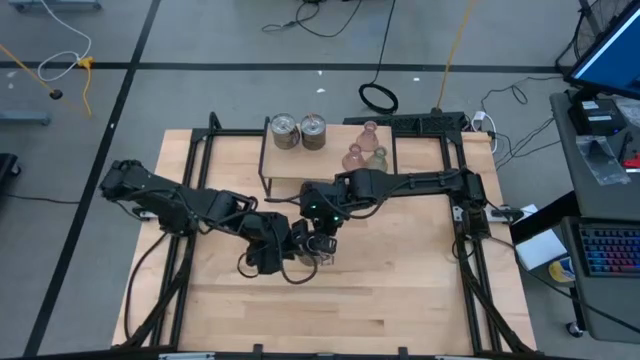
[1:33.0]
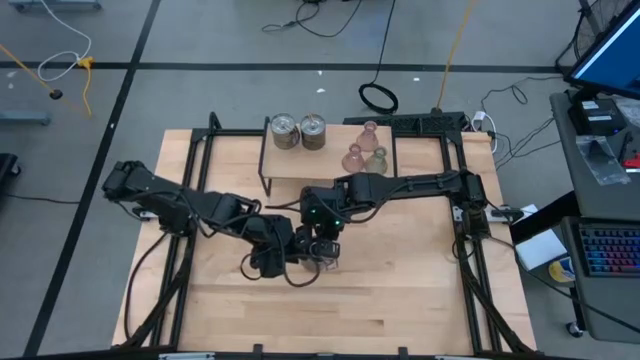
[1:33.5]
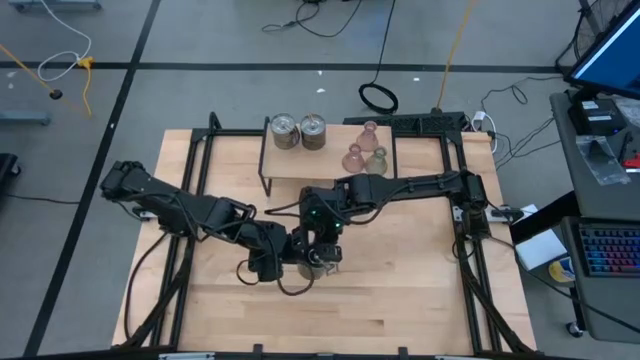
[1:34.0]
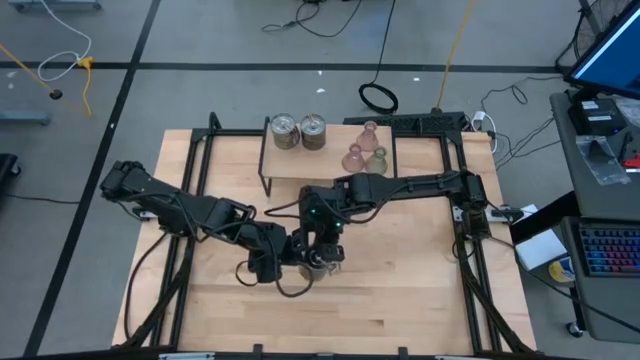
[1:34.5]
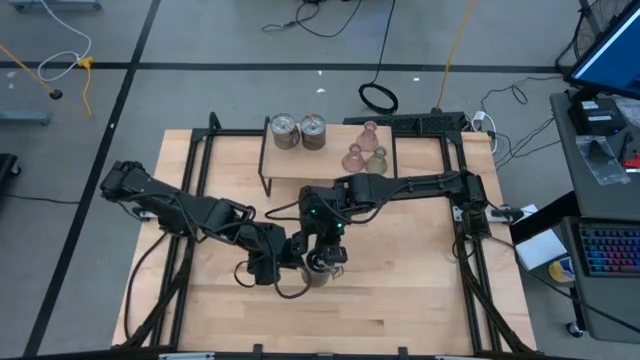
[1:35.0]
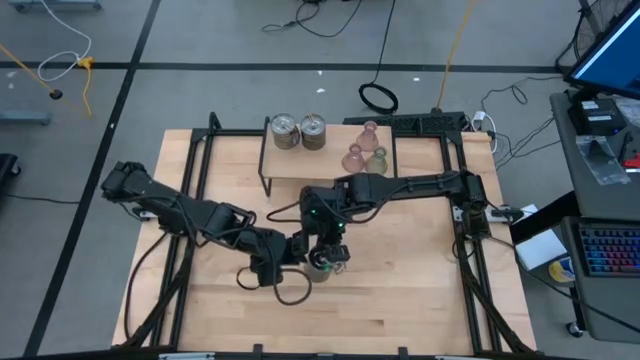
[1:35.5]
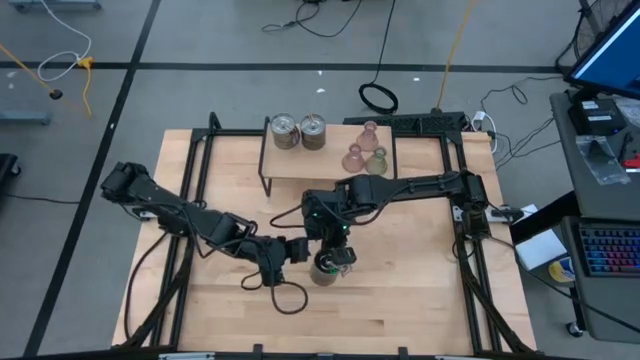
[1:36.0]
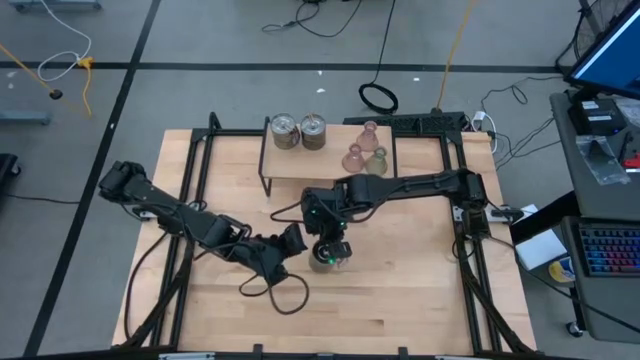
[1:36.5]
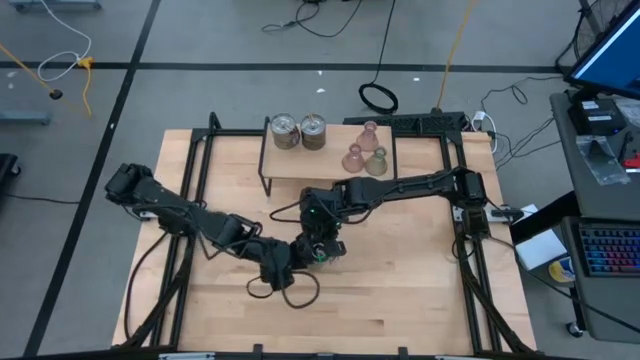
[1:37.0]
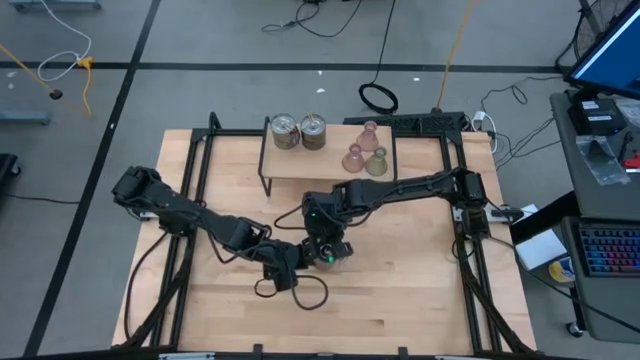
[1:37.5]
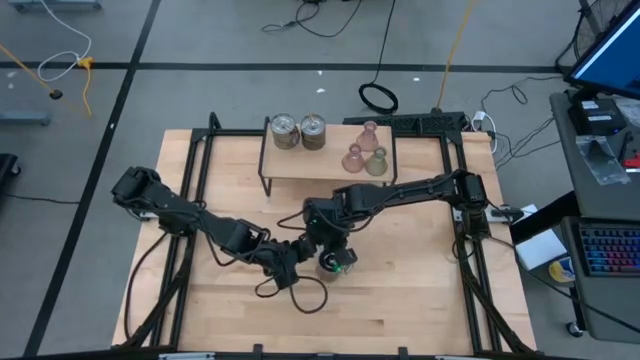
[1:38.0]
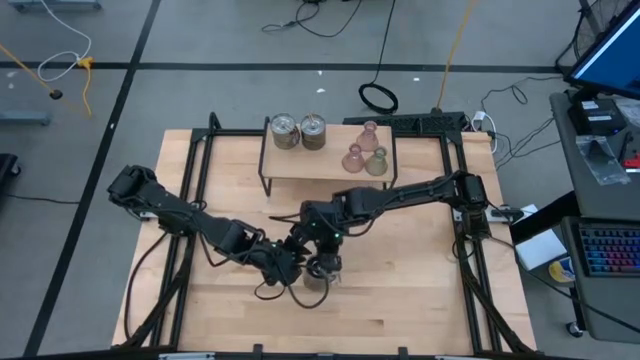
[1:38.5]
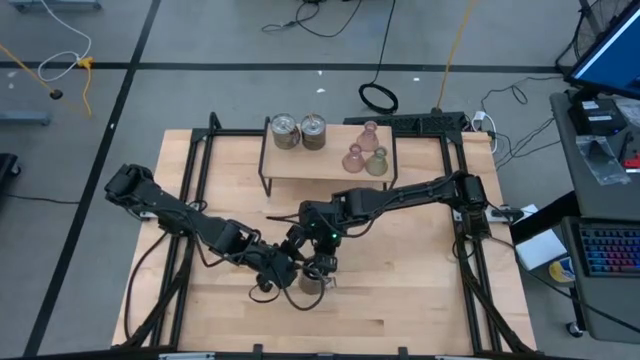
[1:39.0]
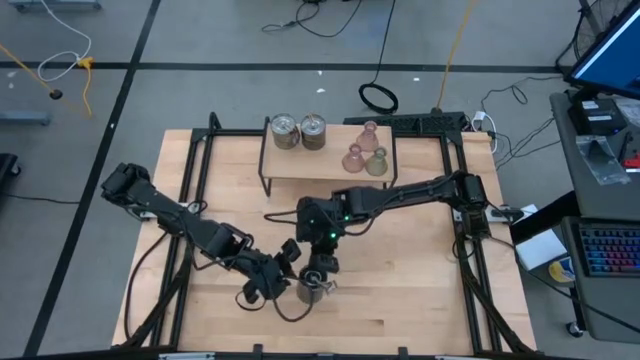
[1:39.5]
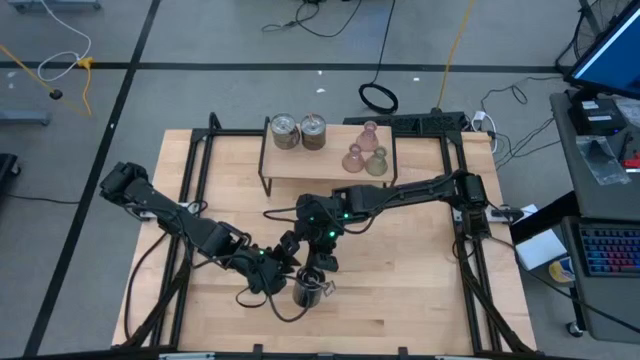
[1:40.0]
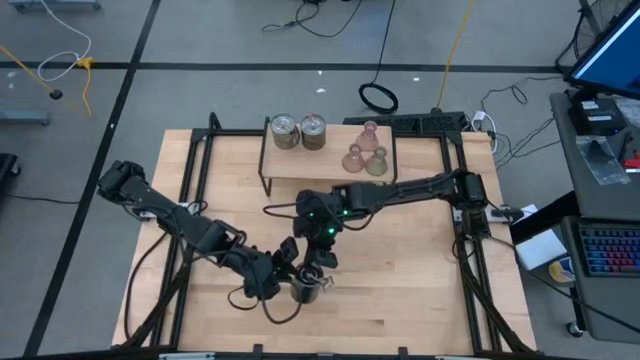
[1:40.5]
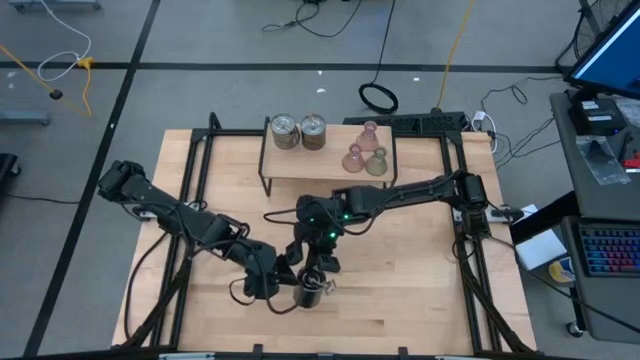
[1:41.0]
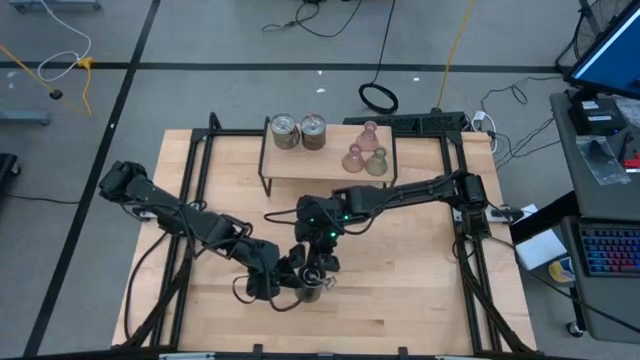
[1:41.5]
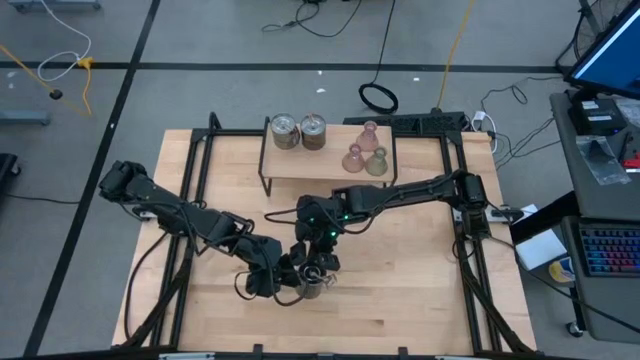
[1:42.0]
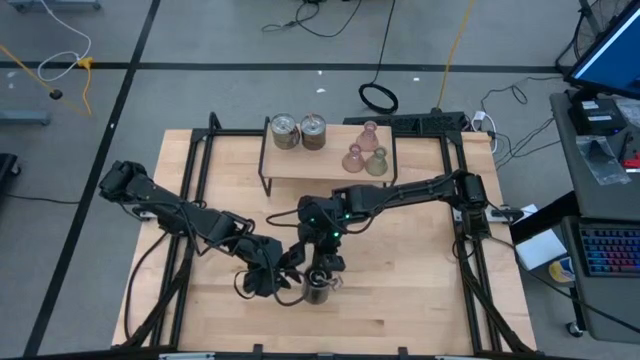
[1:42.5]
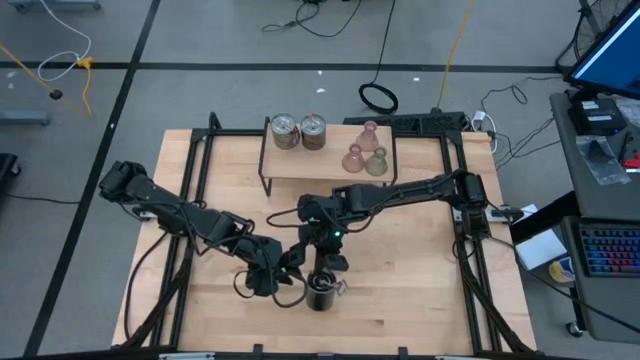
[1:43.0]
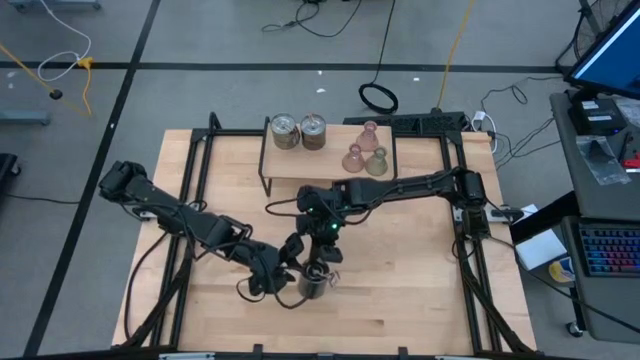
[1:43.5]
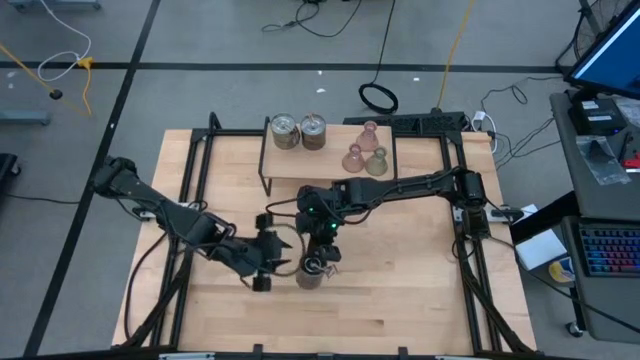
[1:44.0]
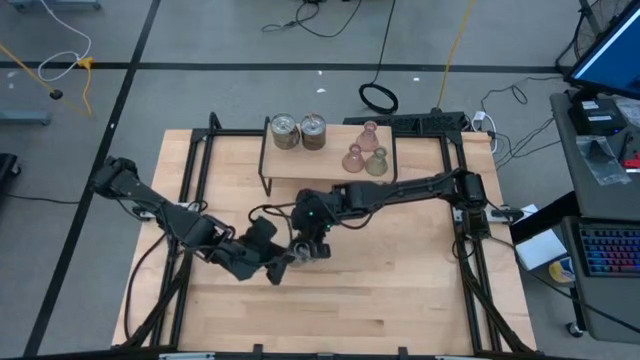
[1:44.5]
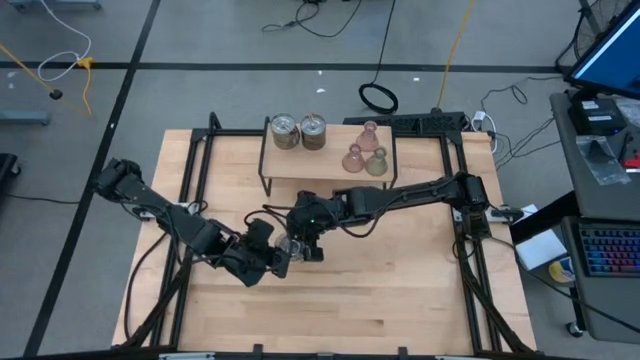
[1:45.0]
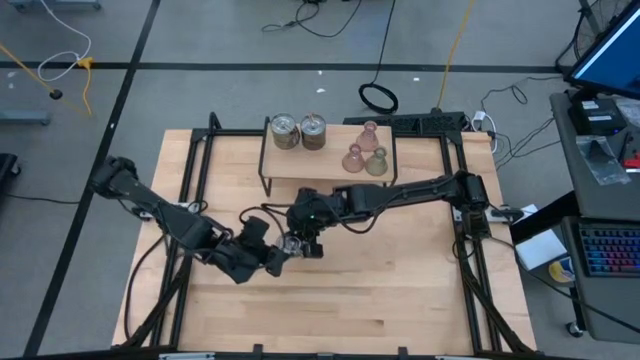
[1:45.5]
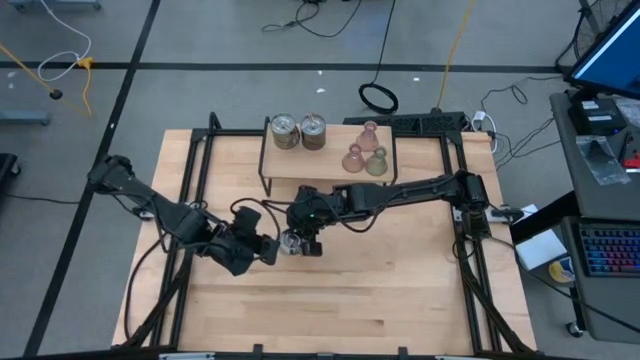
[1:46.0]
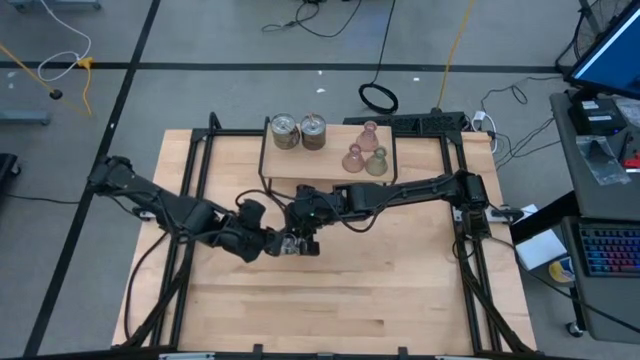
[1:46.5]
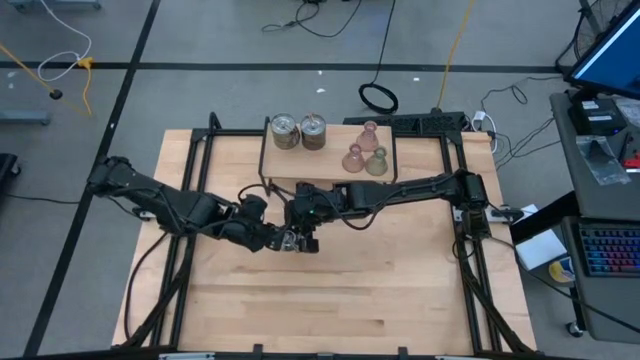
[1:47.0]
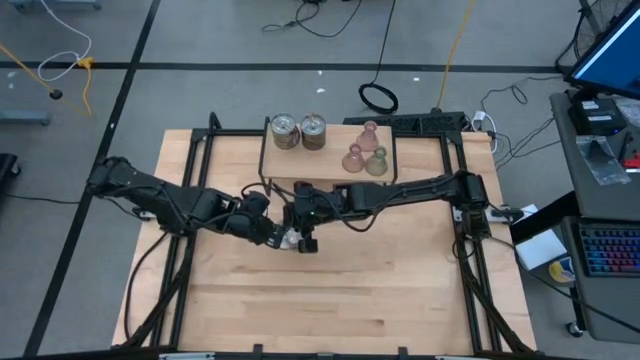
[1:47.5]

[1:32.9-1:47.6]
Task: Pick & Place candle stick holders
Put the scented candle on the shelf

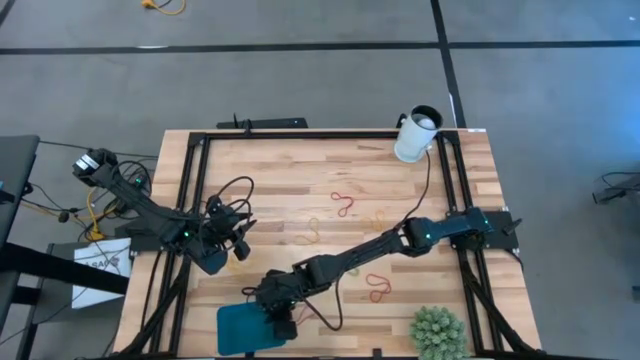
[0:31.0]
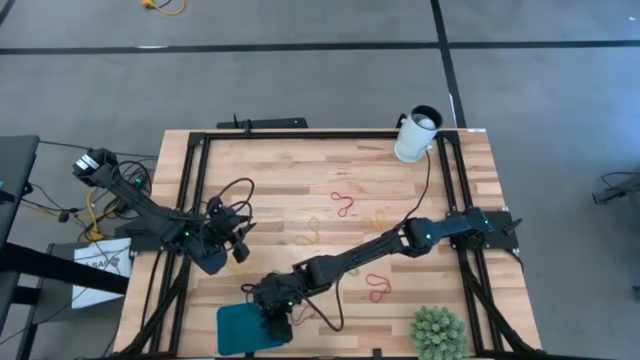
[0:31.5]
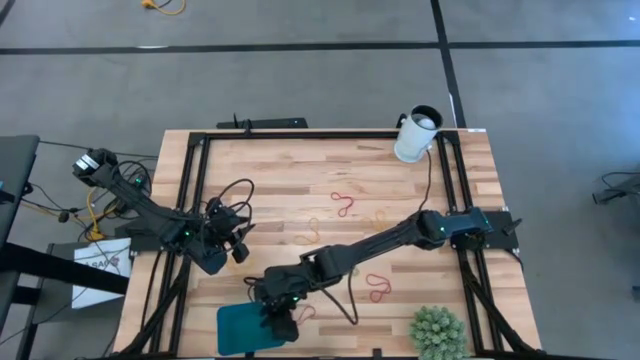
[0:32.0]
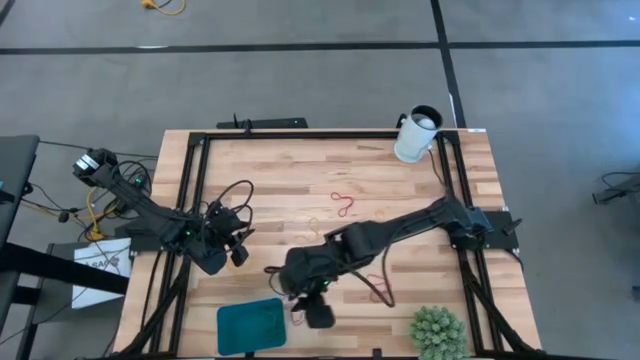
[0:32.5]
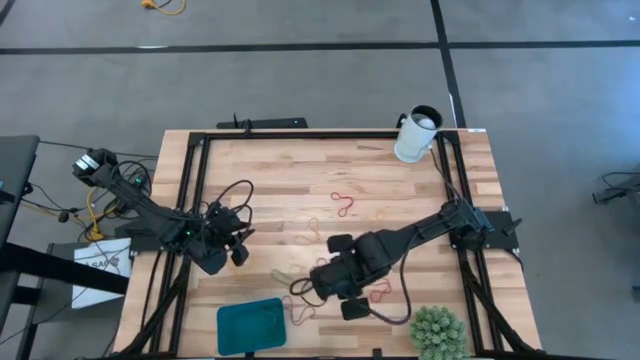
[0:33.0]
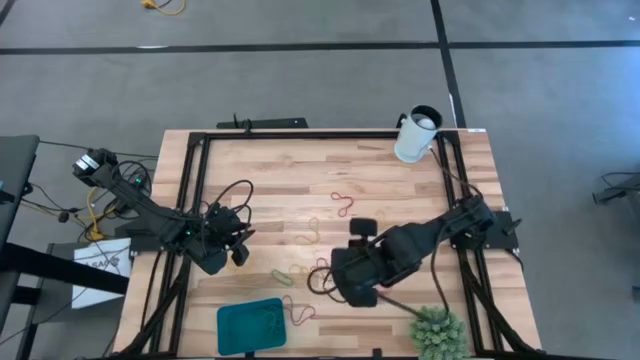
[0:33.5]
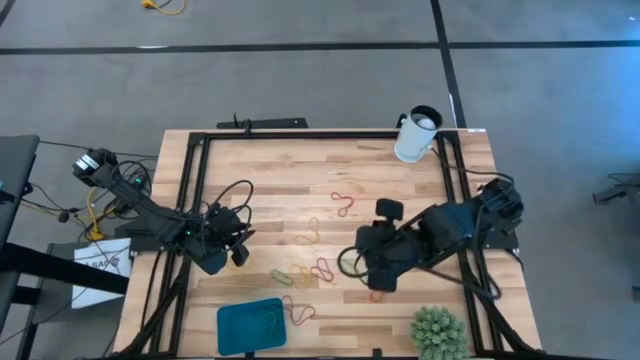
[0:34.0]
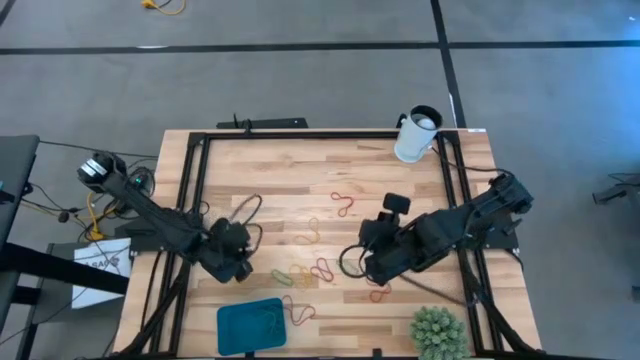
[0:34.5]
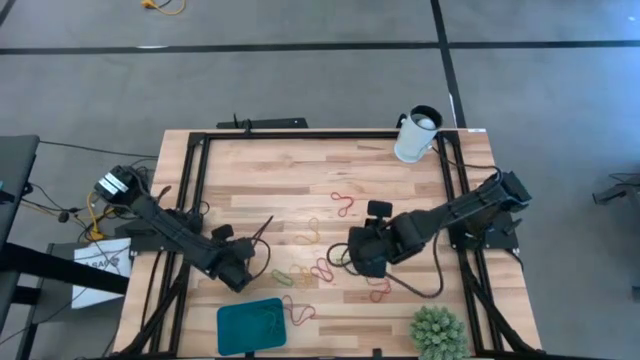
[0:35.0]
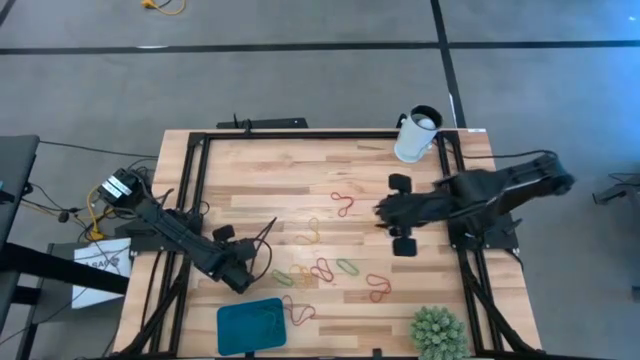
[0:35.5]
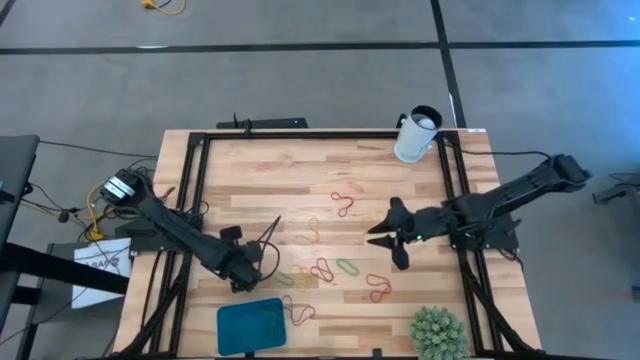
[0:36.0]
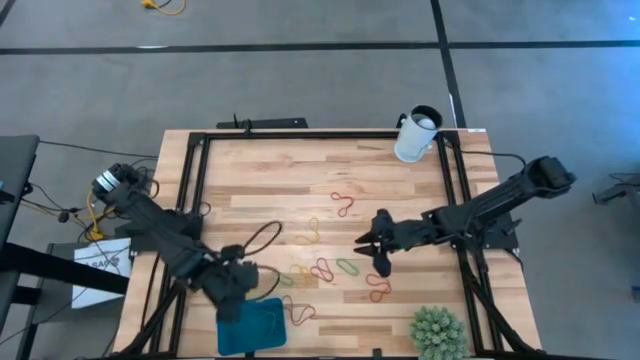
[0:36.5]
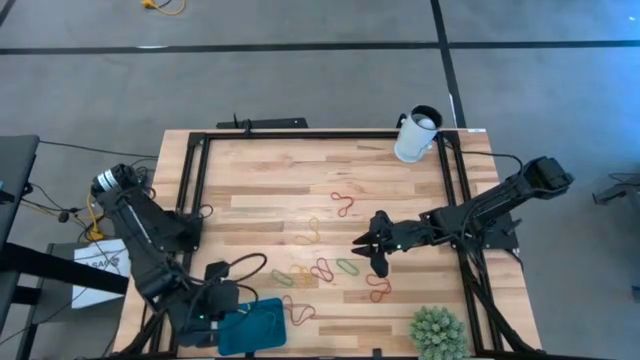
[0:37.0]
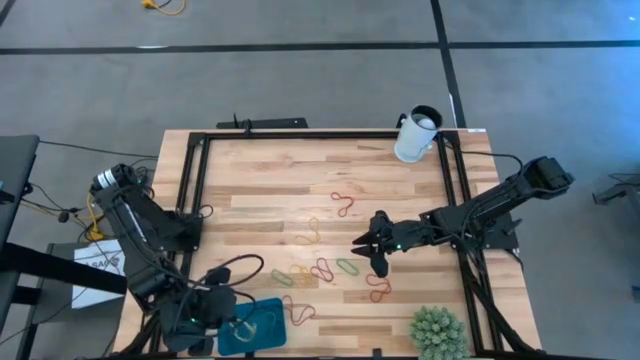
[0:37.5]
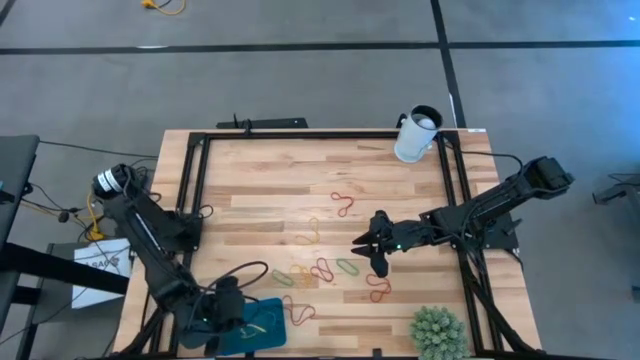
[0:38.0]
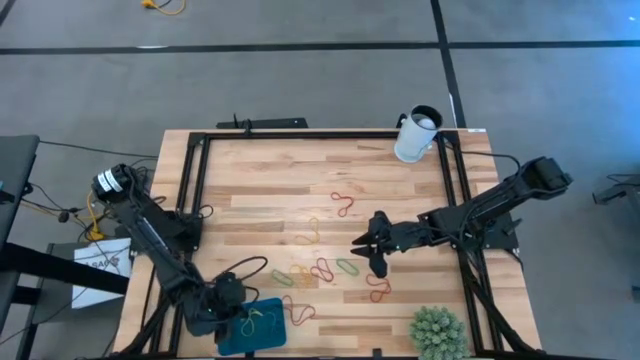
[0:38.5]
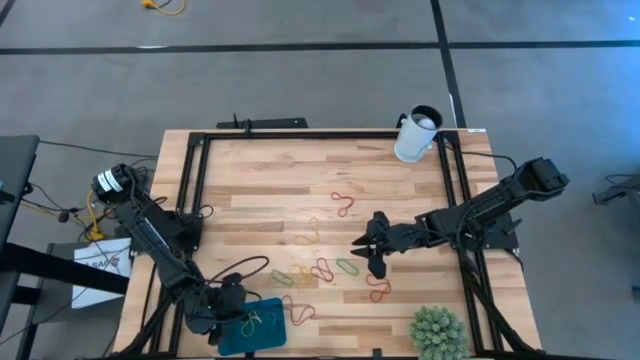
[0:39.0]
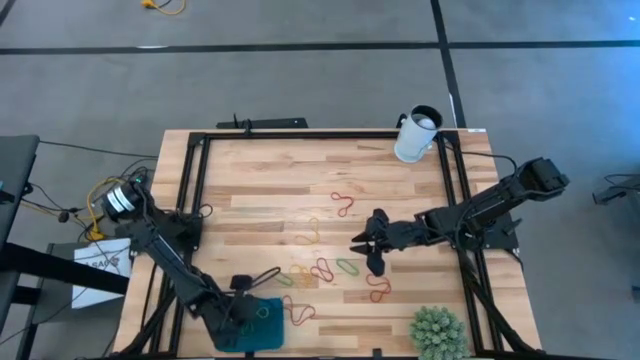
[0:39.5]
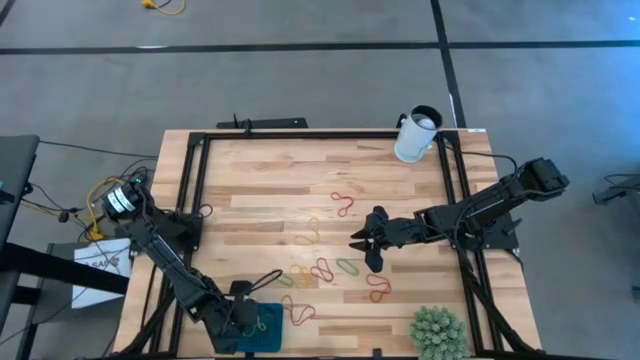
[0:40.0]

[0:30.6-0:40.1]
Task: Pick and place items into bin
Put the yellow rubber band into the blue bin
